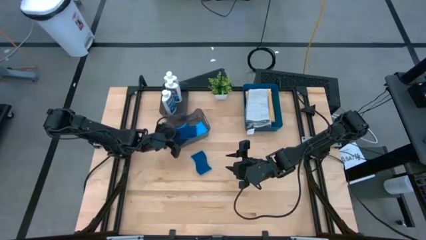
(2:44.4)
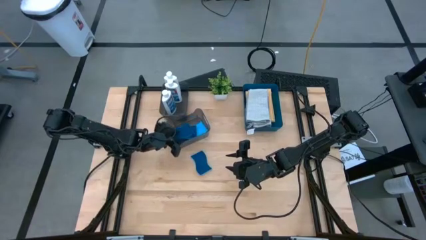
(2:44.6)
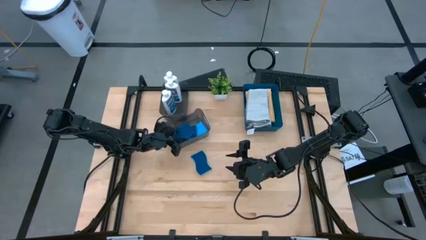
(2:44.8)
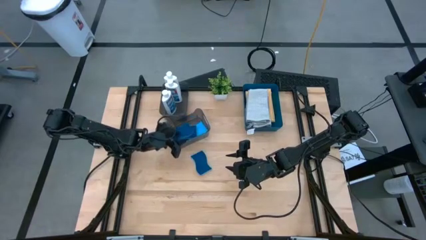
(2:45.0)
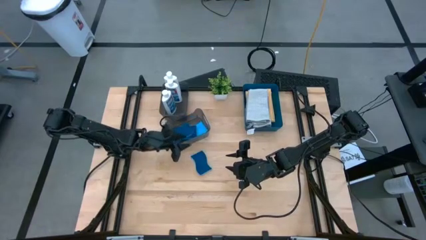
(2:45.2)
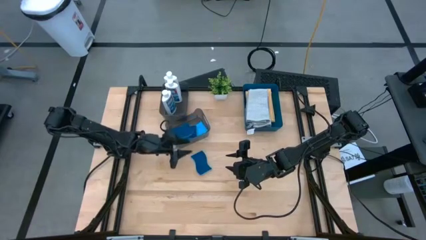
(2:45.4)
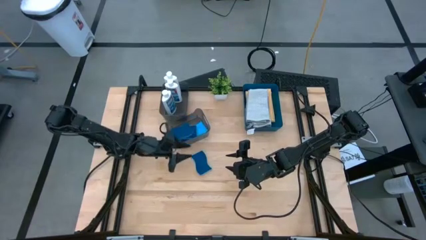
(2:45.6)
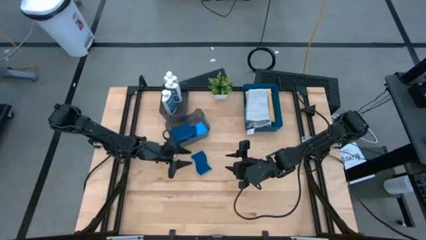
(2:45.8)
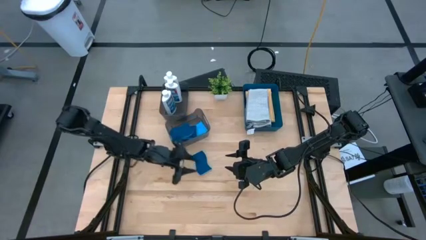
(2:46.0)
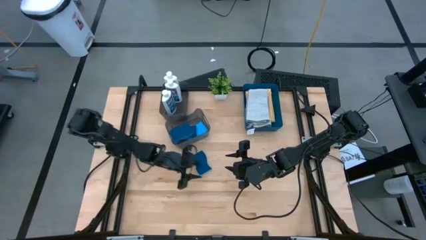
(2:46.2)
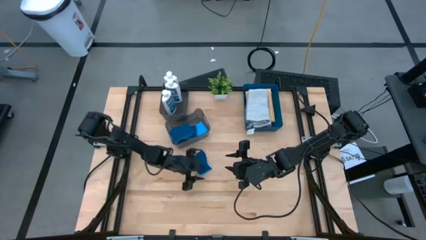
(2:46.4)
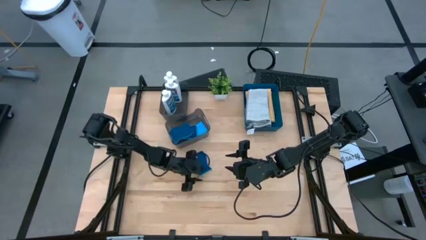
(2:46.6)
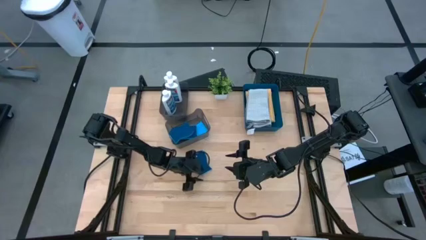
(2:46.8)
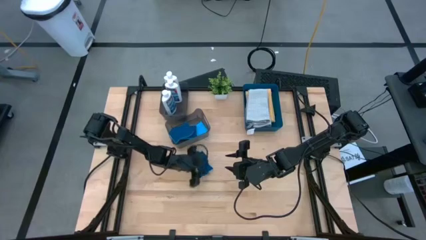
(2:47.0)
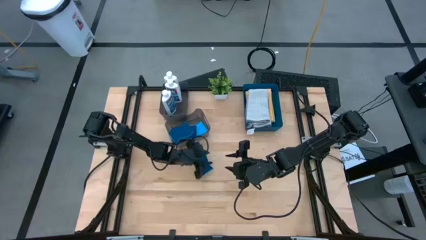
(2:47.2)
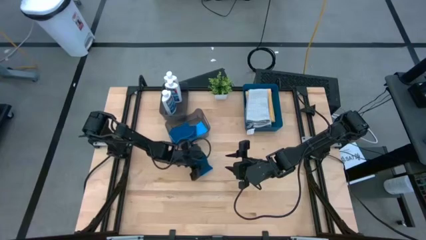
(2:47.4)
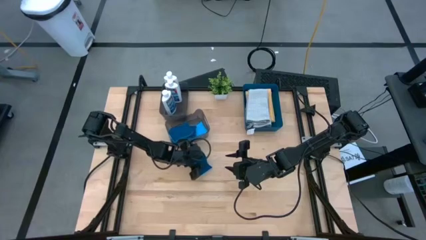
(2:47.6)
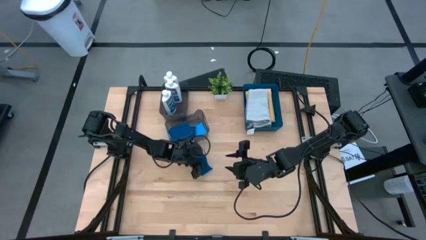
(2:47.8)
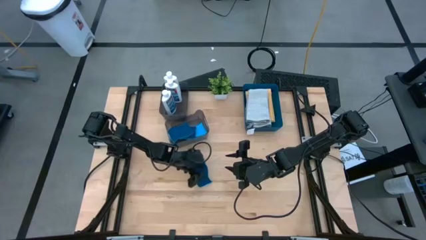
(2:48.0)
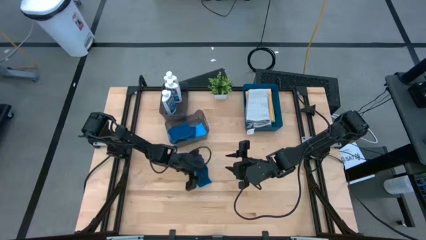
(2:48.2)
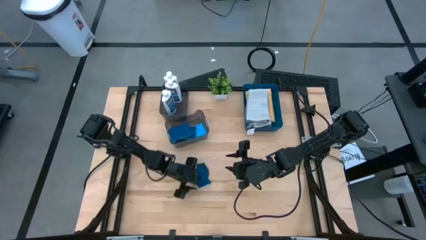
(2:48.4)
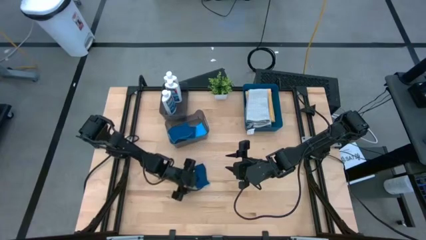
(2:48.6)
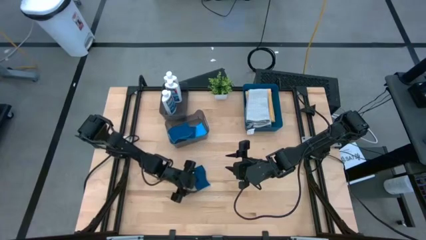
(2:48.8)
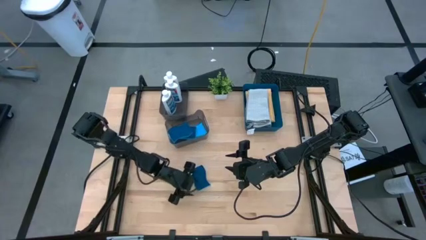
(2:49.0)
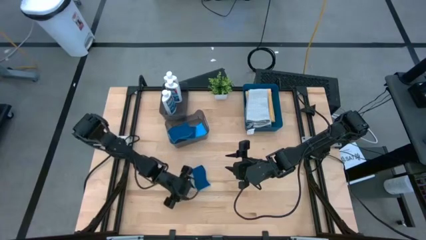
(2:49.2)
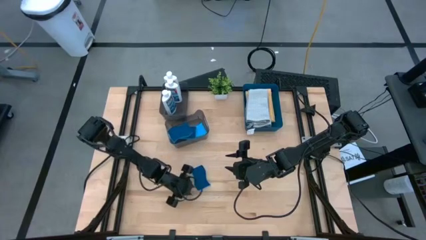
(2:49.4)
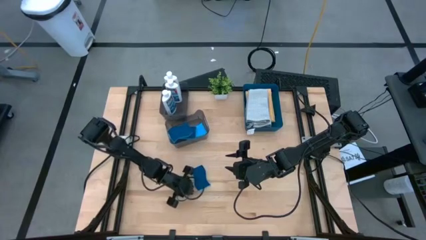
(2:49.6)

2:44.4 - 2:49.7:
Task: Pick & Place Kitchen Items
Put the blue sponge into the bottom black bin

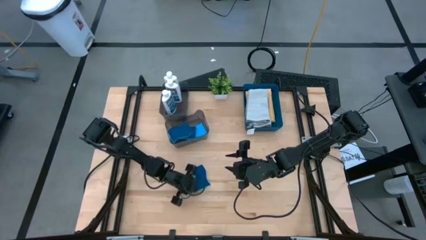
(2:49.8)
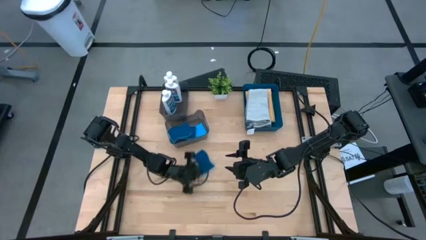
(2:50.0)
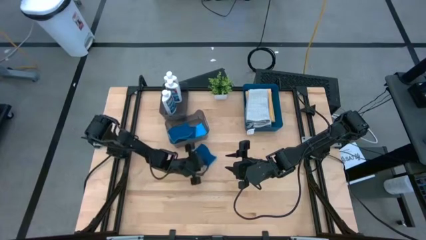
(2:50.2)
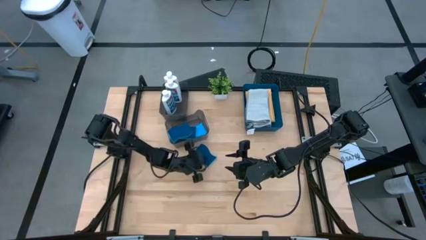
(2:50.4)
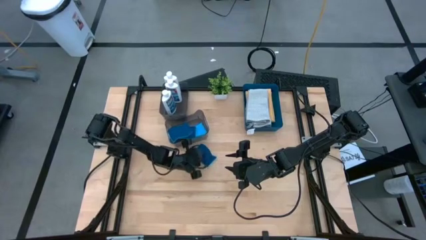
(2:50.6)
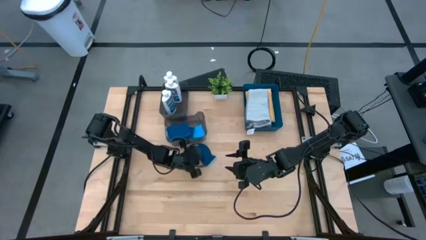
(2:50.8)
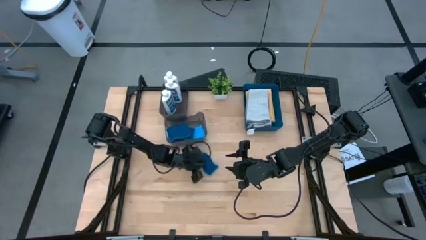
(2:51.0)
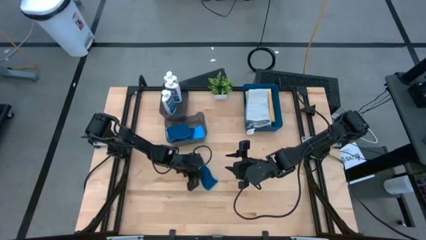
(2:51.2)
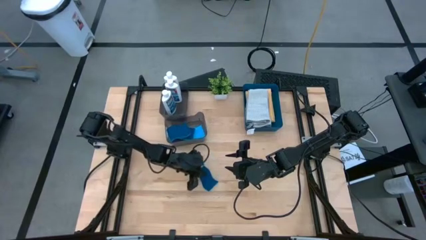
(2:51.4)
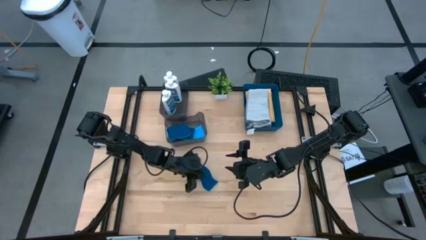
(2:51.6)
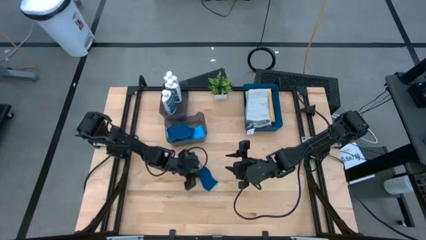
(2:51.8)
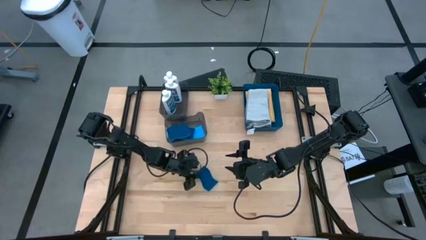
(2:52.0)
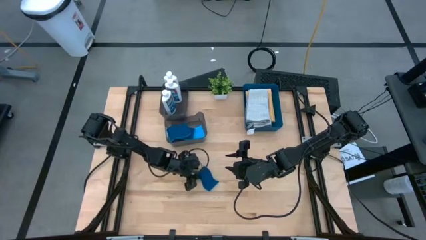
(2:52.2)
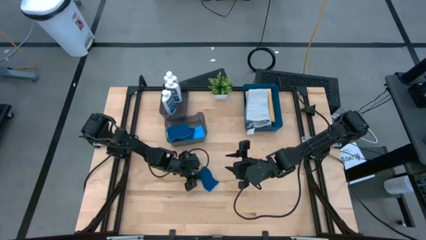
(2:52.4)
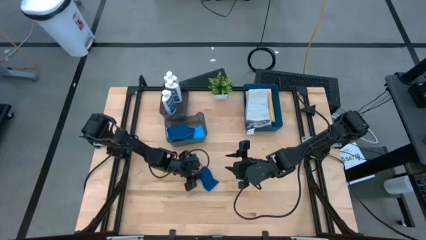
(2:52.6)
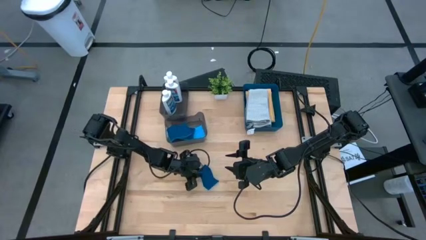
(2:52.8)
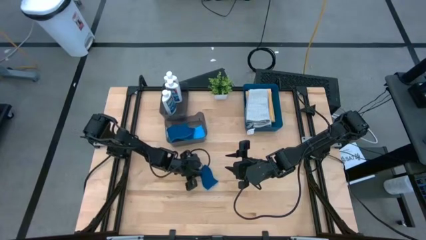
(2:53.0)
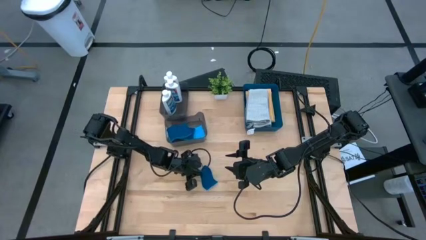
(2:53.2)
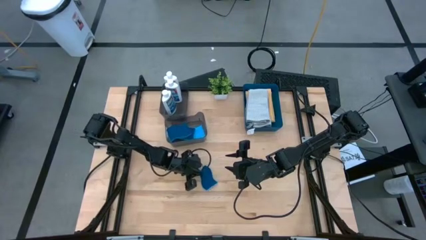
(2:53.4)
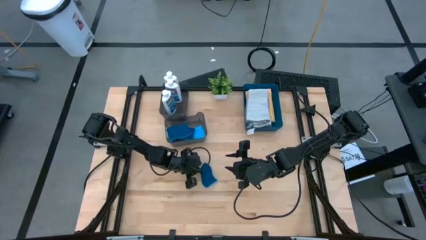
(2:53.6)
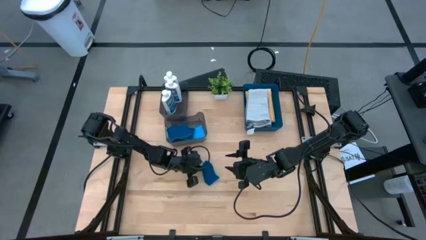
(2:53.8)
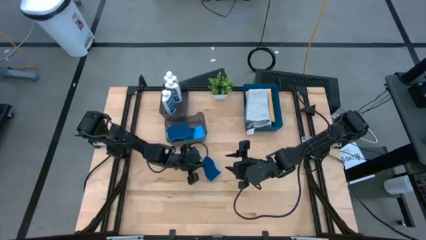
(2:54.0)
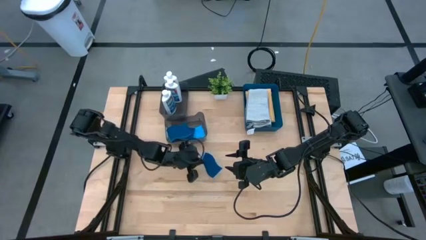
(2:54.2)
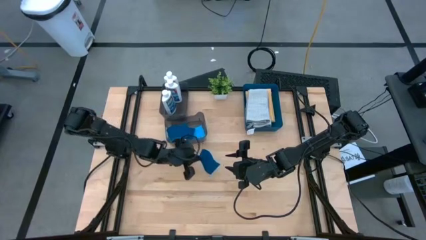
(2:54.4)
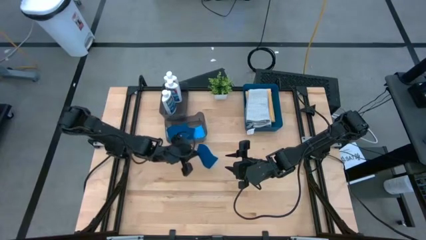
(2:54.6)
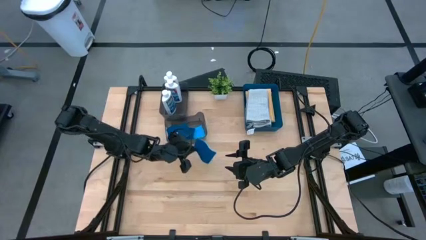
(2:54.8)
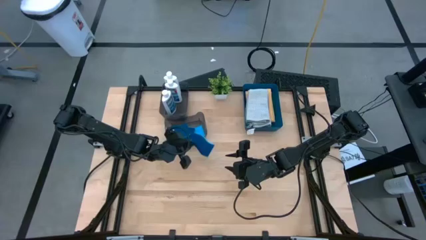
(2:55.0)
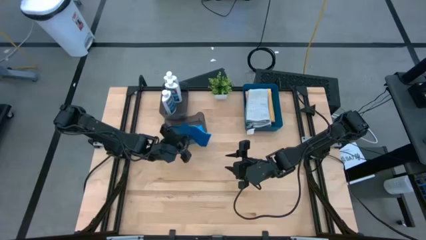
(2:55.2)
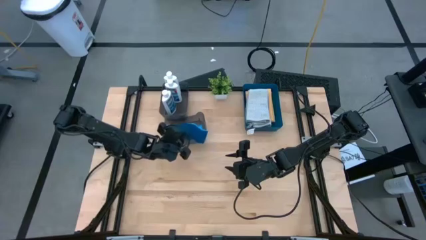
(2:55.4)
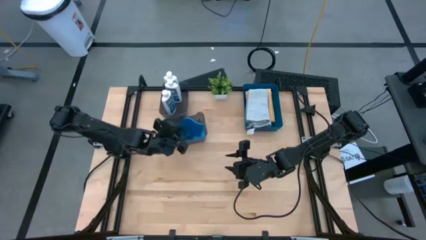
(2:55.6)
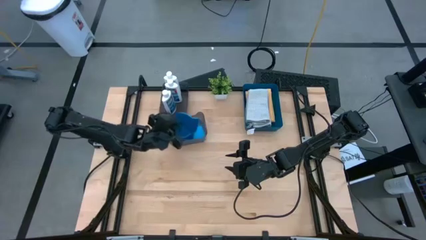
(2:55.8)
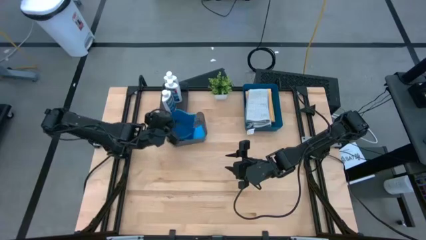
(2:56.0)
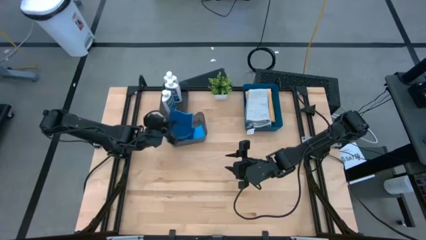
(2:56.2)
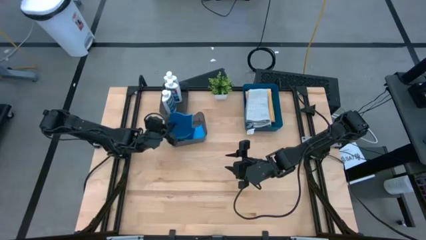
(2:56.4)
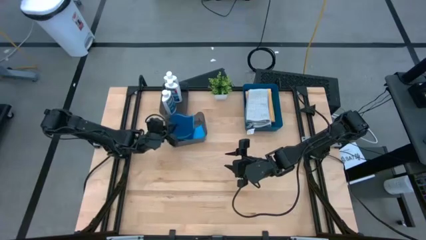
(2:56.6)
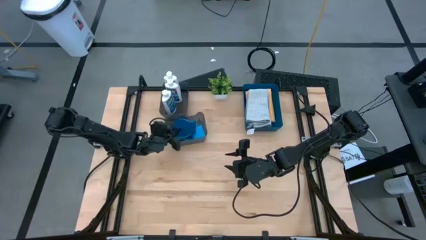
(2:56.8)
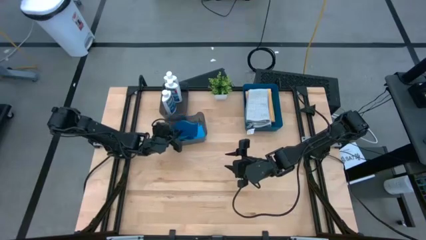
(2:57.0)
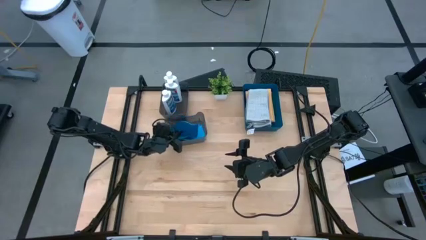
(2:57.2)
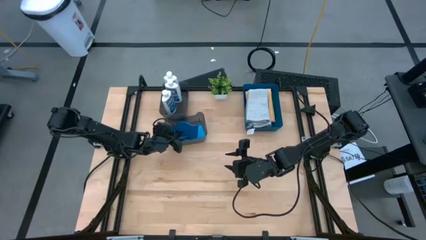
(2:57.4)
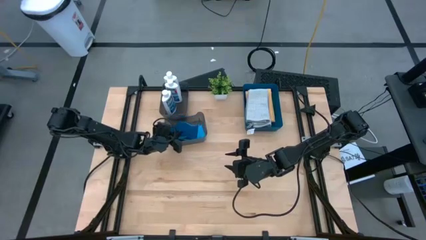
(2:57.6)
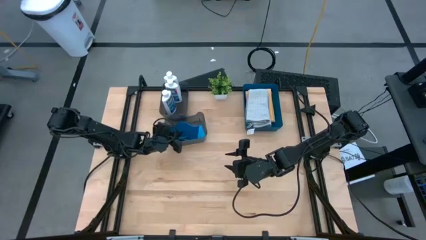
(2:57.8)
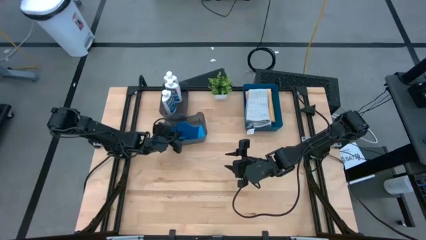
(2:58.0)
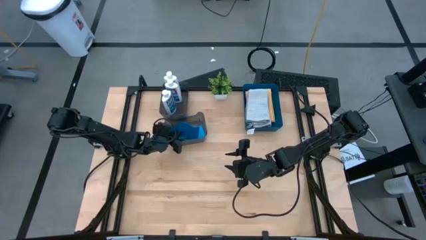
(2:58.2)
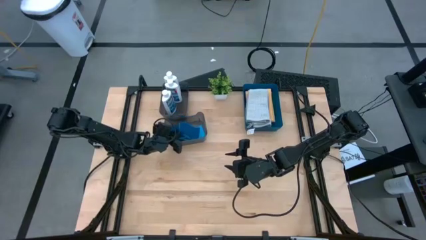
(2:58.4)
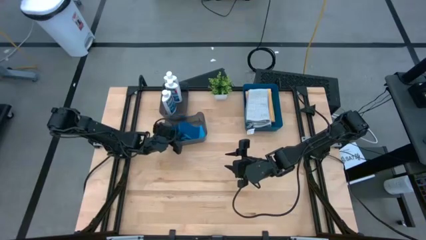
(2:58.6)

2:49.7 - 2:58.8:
Put the blue sponge into the bottom black bin

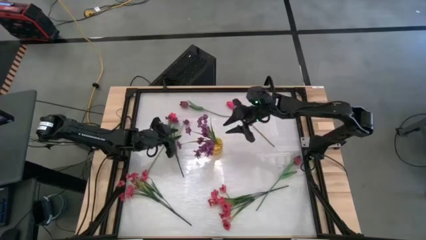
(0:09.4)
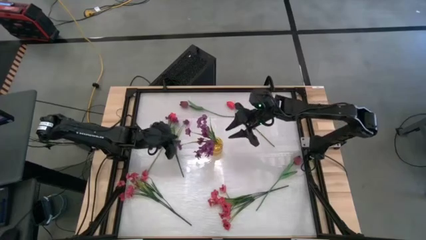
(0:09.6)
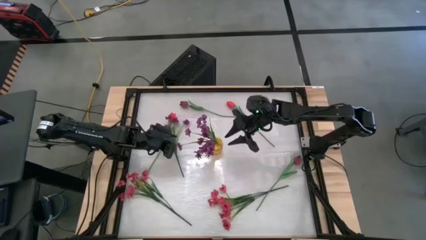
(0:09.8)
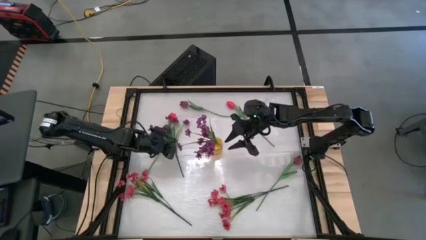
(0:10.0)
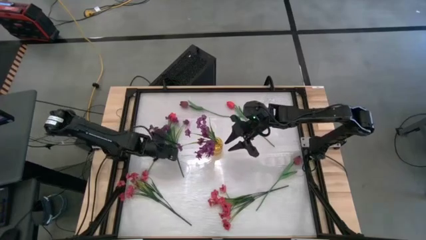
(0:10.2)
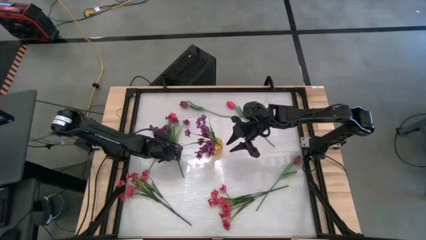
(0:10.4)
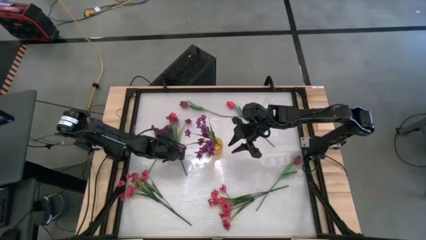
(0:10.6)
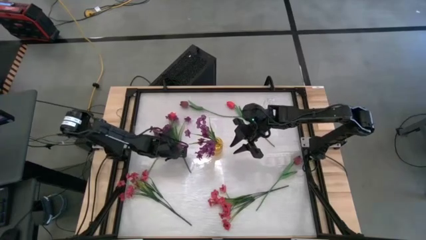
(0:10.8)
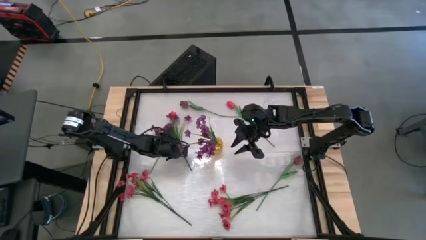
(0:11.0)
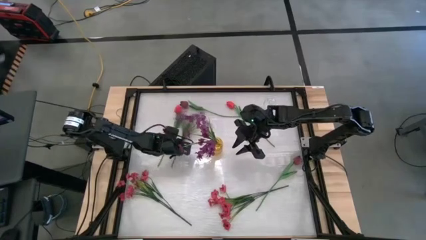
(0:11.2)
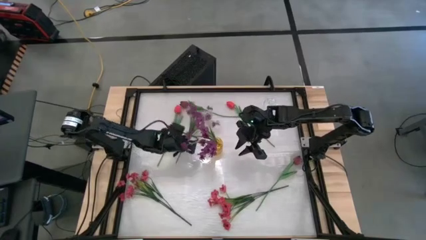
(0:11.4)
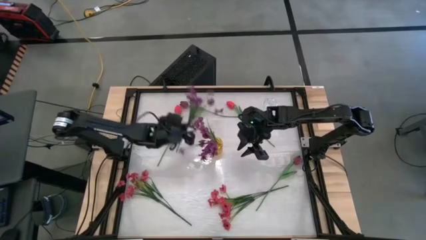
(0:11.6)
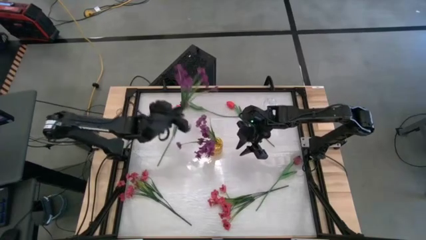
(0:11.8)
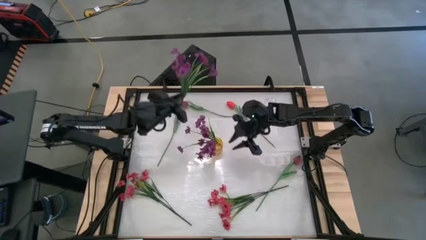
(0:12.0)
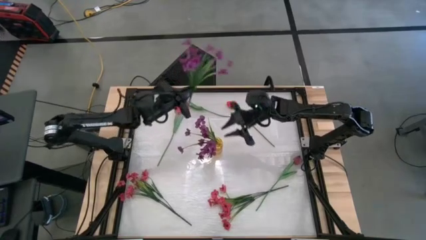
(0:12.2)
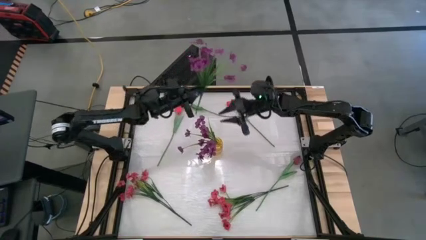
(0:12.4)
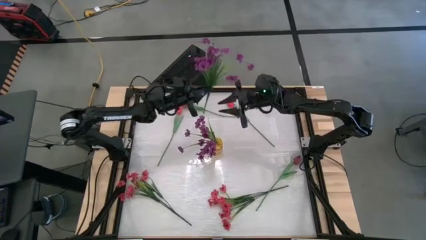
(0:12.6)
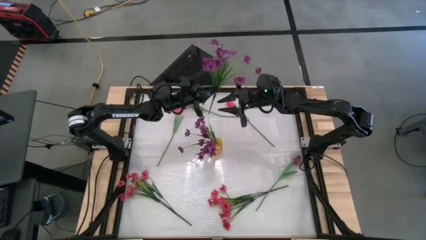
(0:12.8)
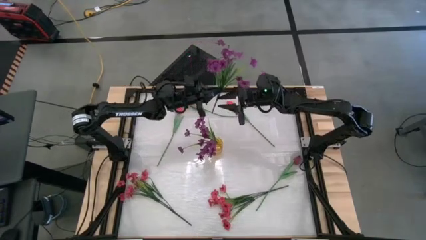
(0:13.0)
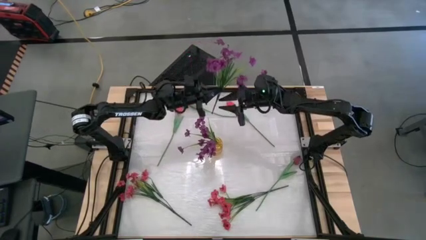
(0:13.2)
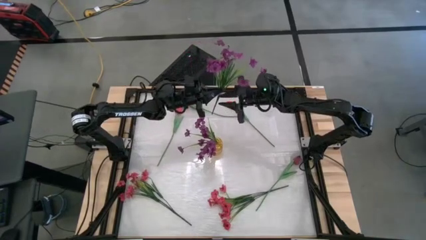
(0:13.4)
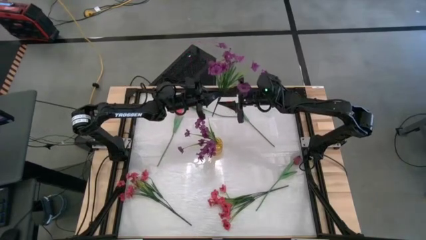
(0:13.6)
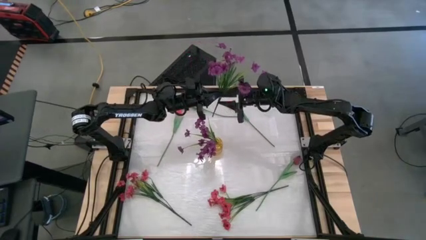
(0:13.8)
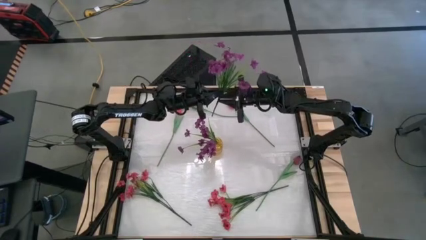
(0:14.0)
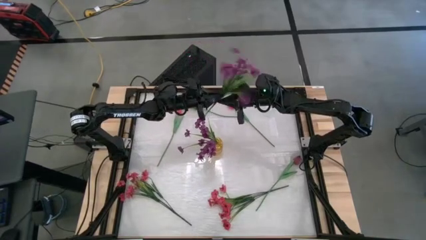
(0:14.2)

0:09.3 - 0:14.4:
Task: Sort flowers into vase by color
Put the purple flowers into the yellow vase
